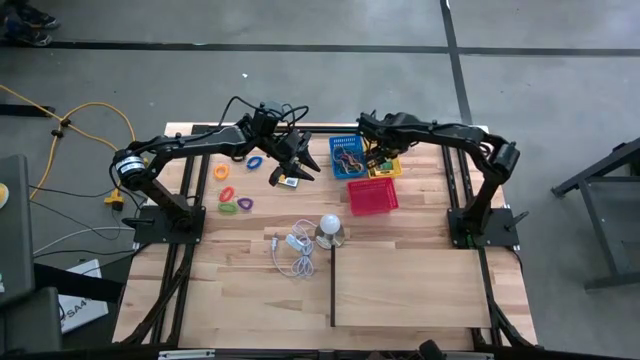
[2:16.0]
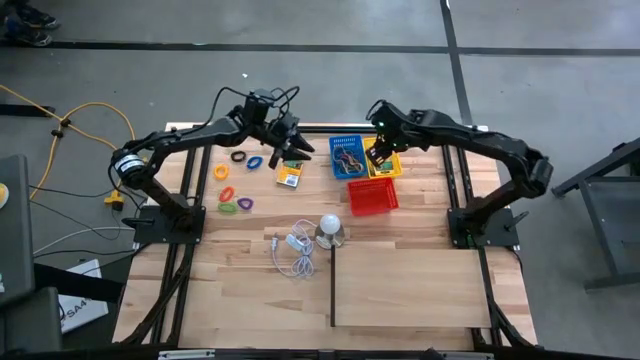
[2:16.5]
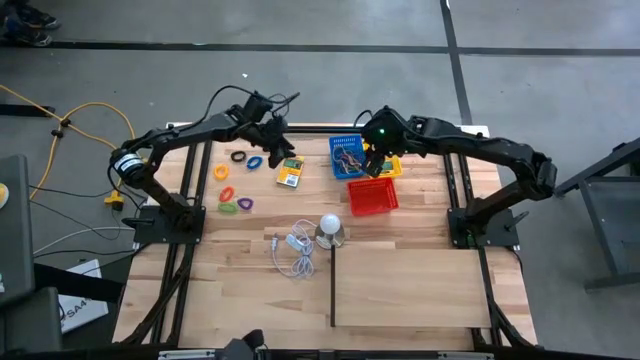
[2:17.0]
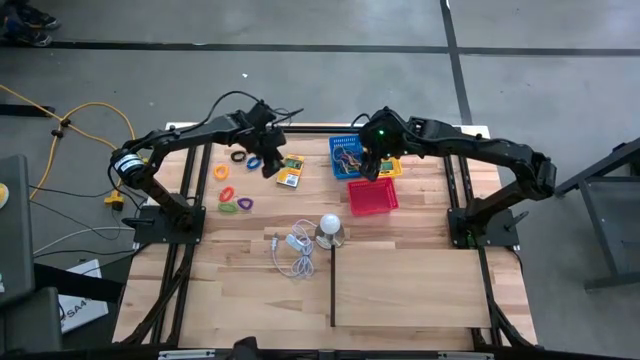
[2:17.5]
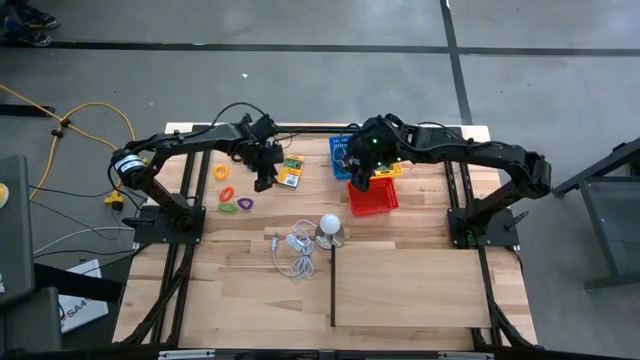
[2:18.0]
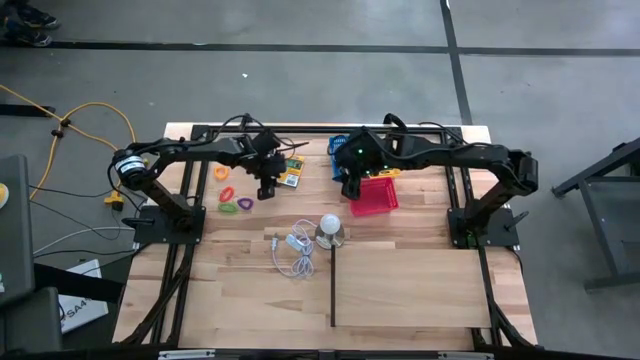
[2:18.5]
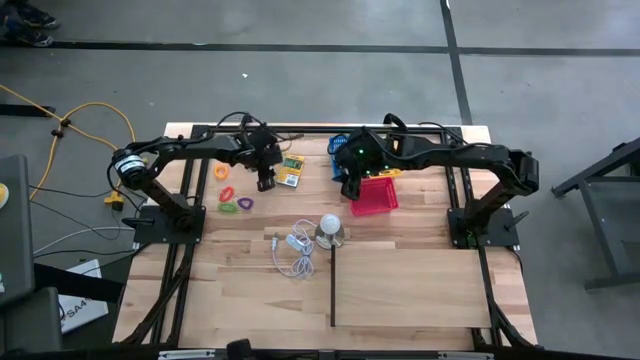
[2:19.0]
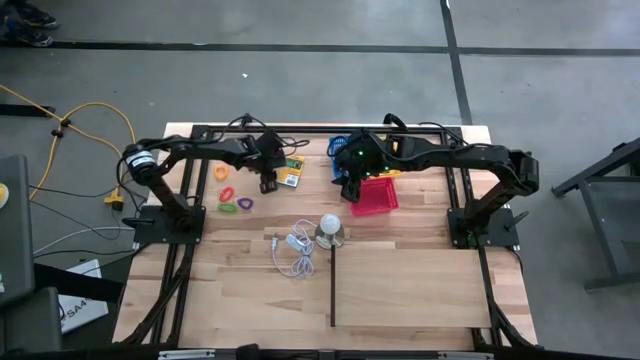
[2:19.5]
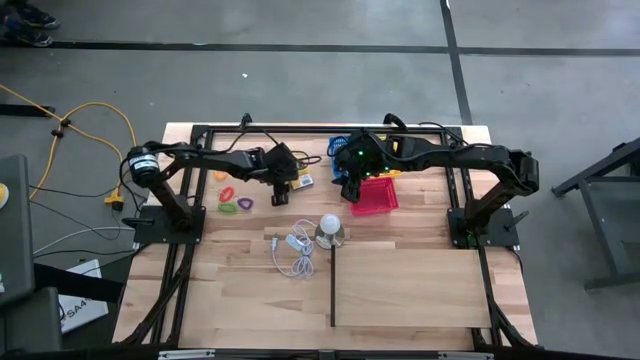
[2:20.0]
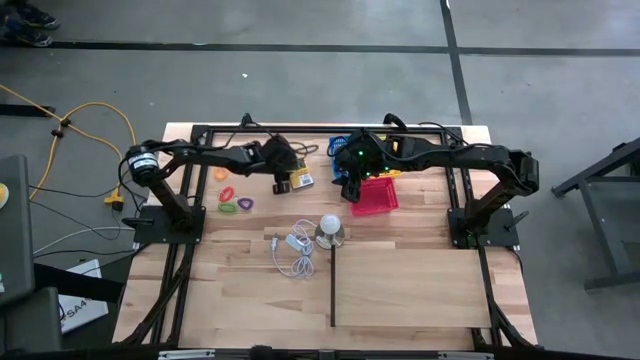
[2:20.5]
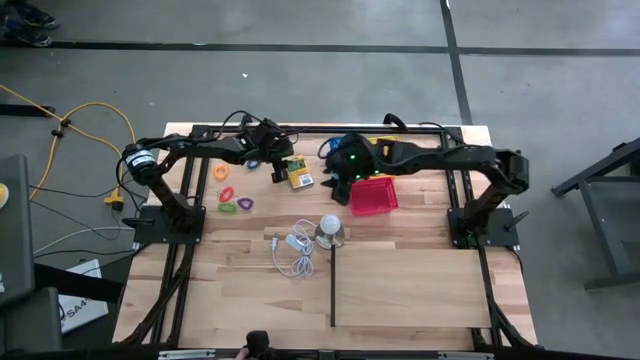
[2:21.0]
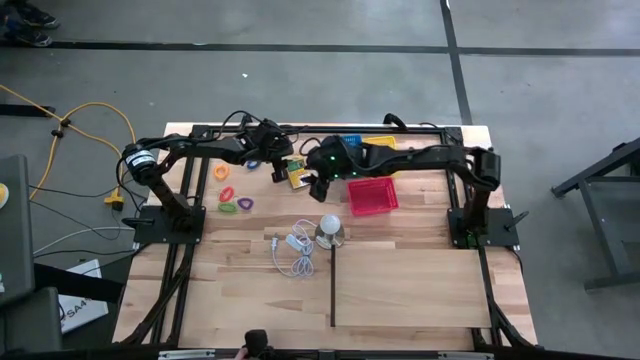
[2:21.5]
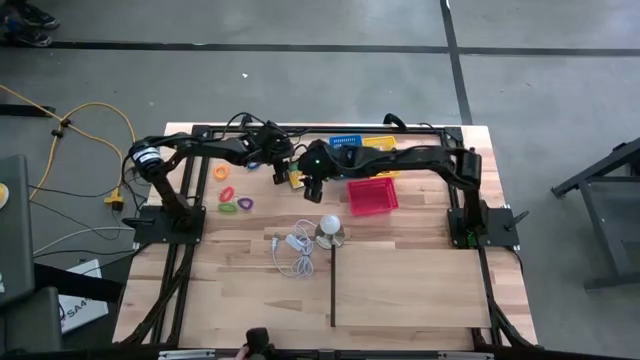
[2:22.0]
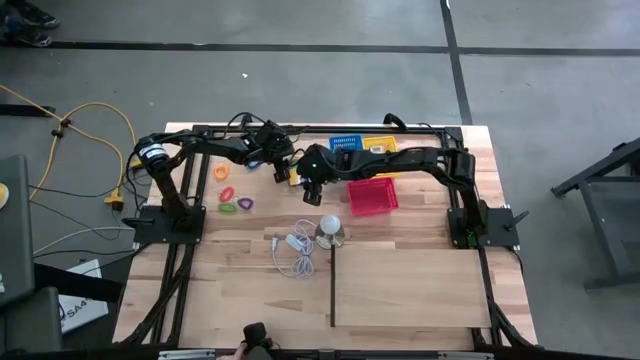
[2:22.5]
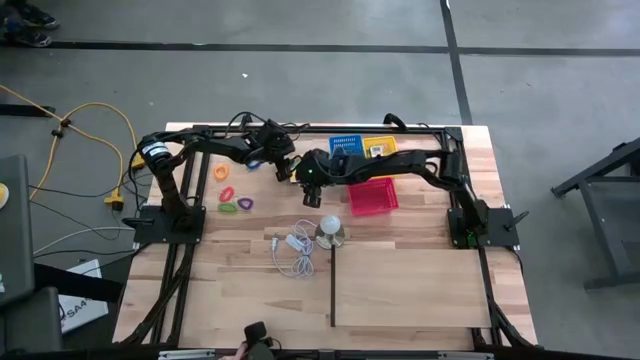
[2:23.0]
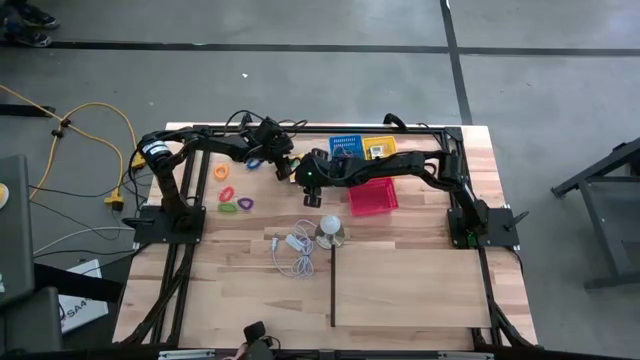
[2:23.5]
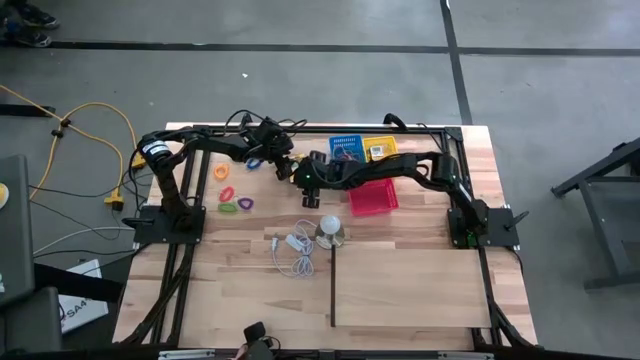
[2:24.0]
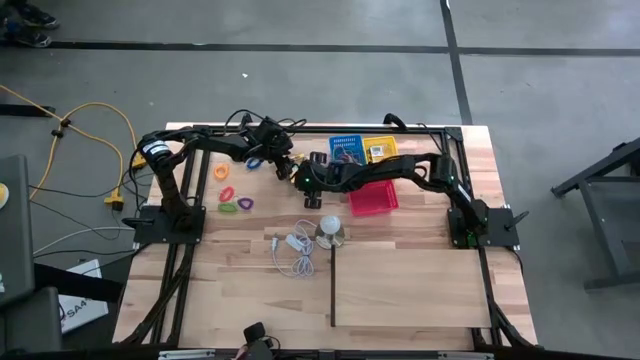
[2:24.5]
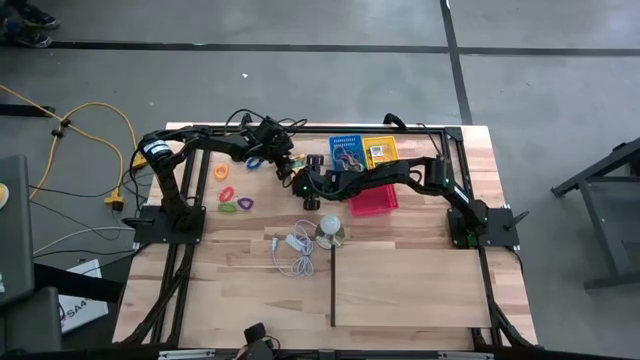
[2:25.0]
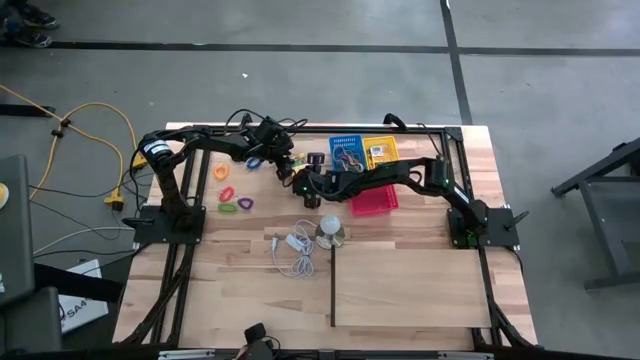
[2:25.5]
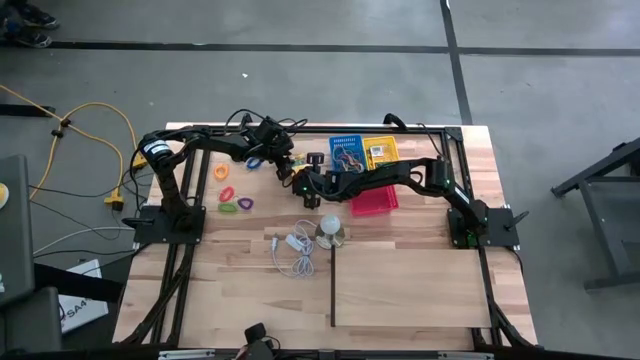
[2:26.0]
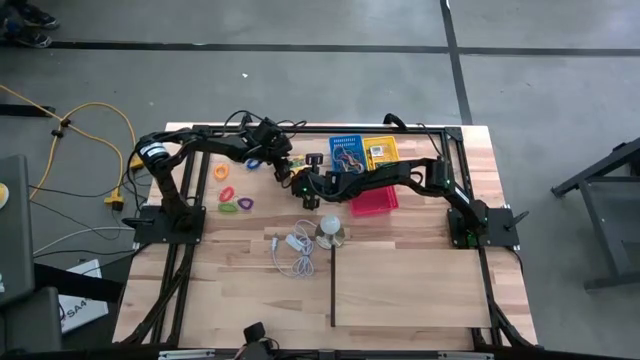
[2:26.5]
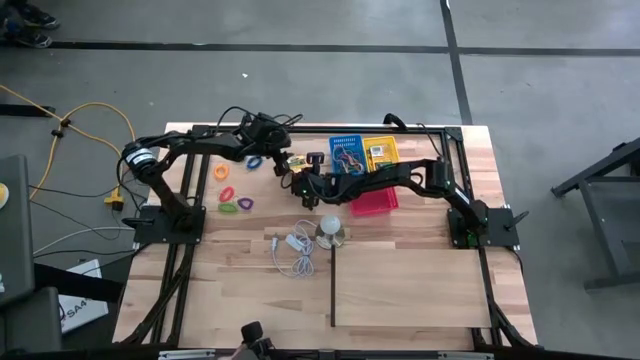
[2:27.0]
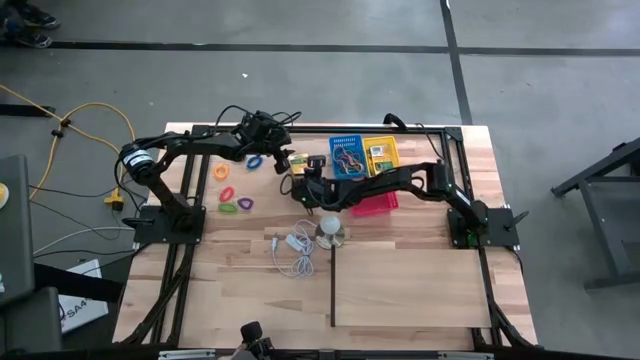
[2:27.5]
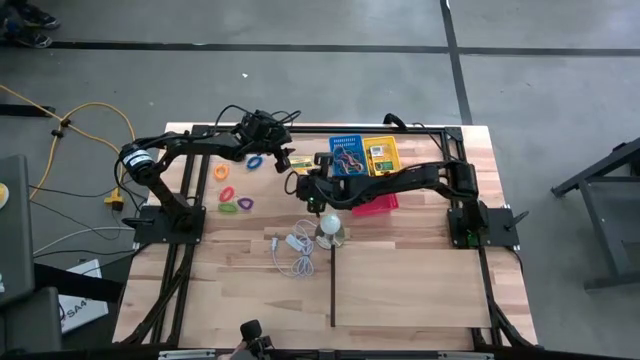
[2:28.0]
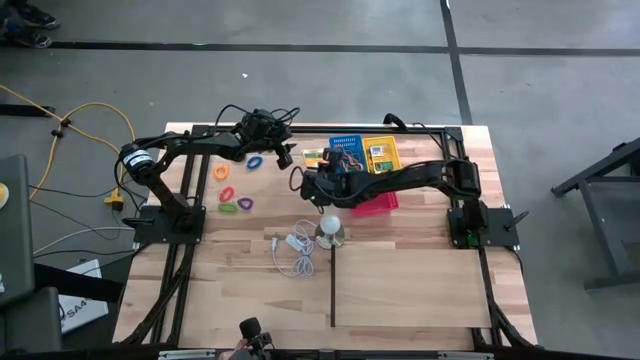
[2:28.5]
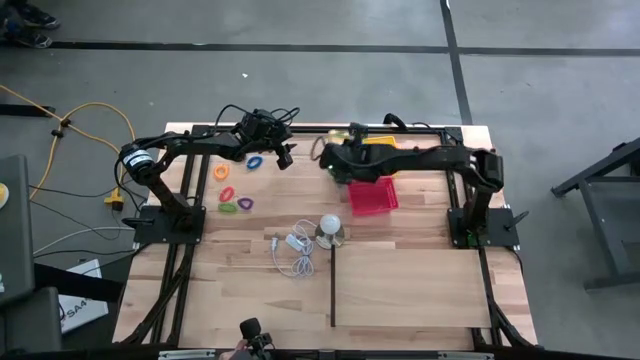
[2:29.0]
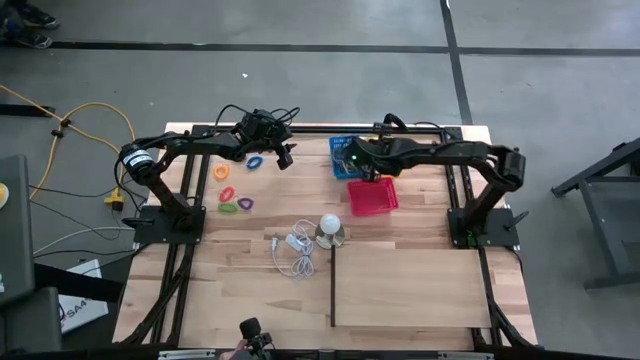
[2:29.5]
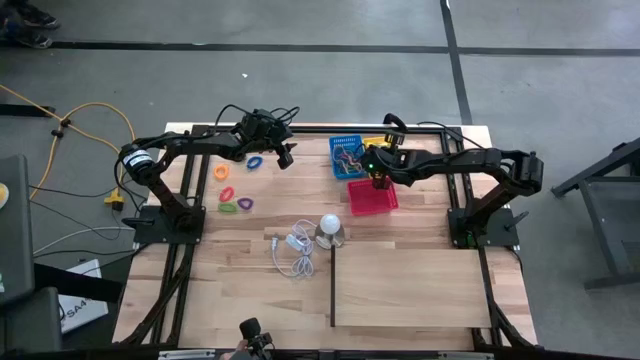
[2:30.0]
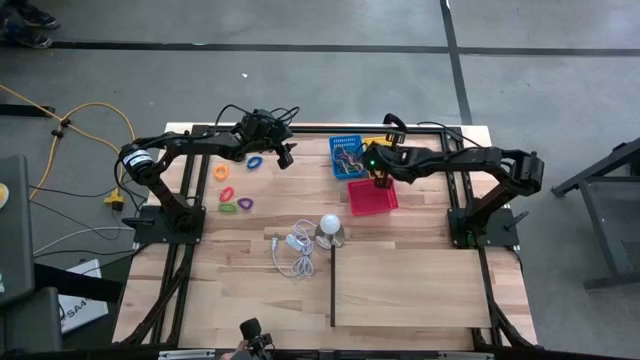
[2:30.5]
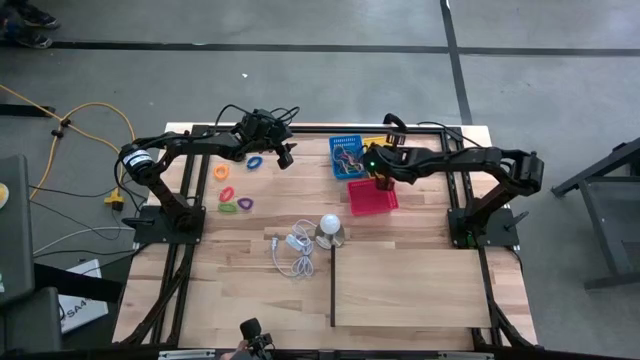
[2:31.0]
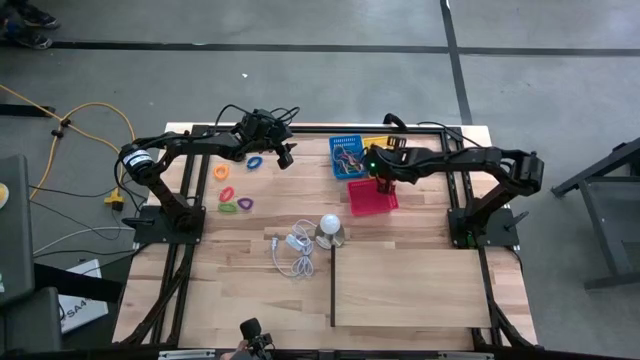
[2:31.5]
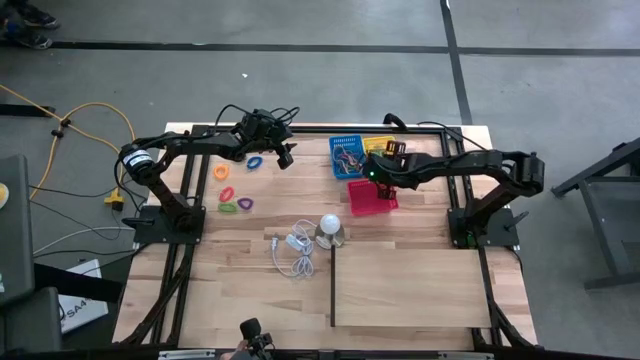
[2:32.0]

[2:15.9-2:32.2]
Task: Pick & Place Office Desk Supplies
Stack the yellow crayon box on top of the yellow crayon box

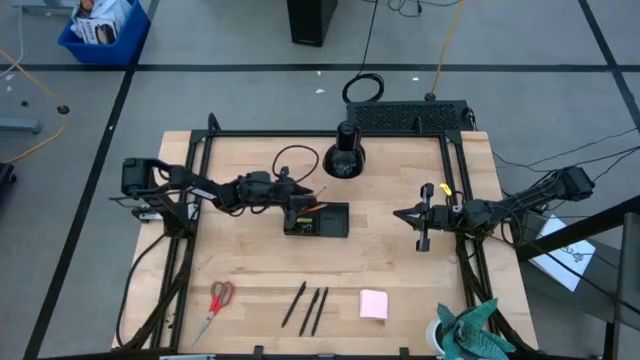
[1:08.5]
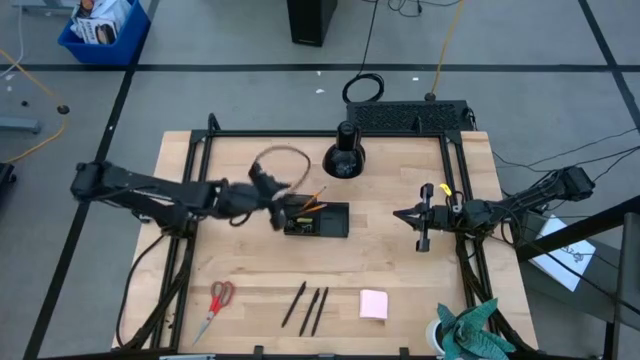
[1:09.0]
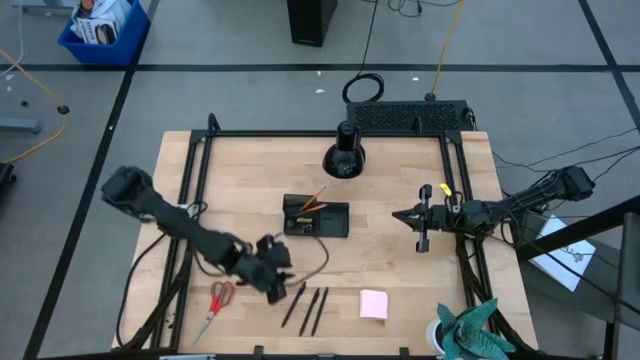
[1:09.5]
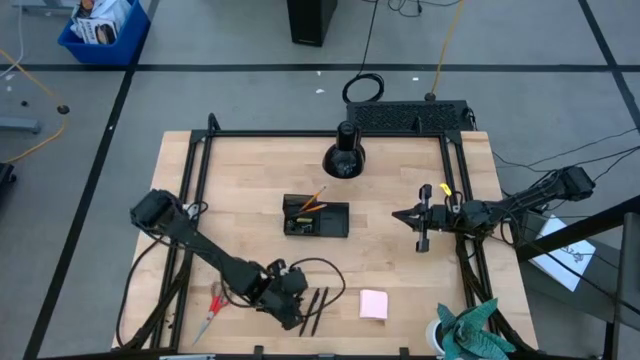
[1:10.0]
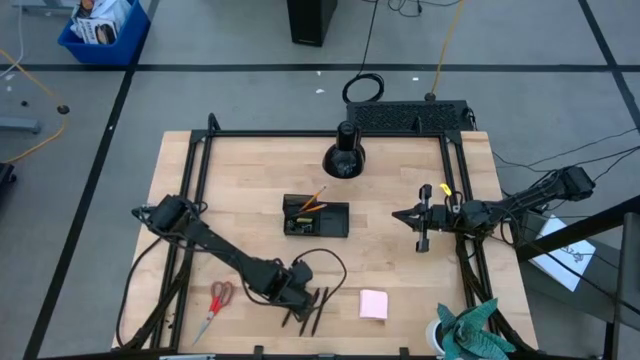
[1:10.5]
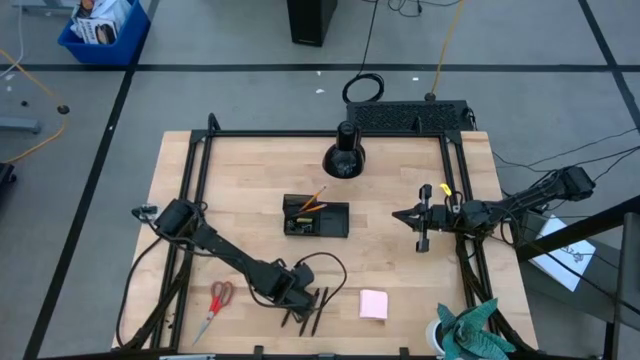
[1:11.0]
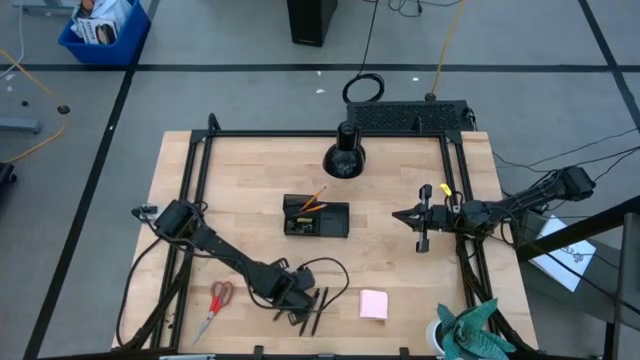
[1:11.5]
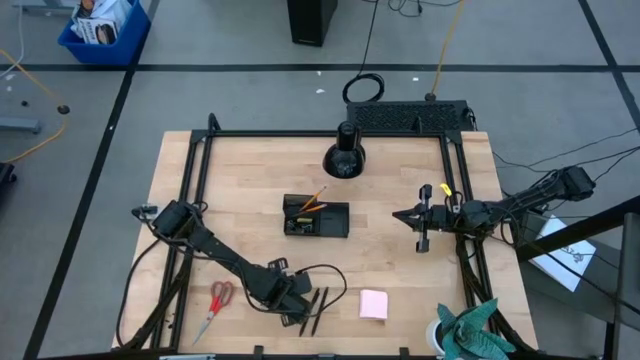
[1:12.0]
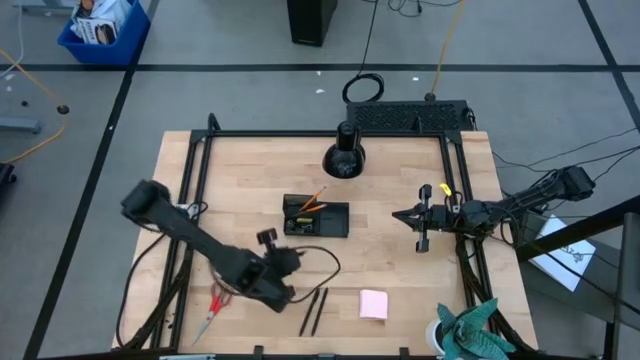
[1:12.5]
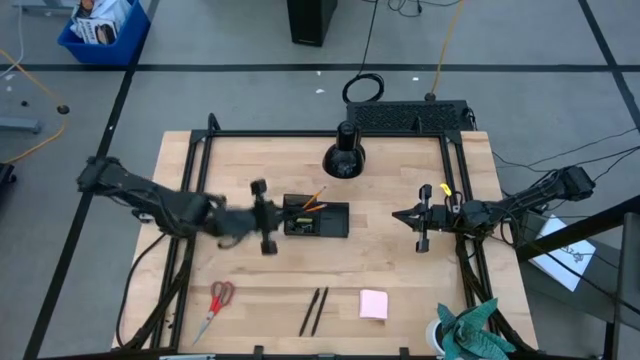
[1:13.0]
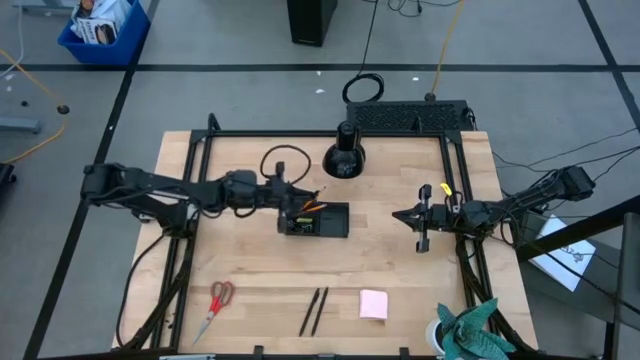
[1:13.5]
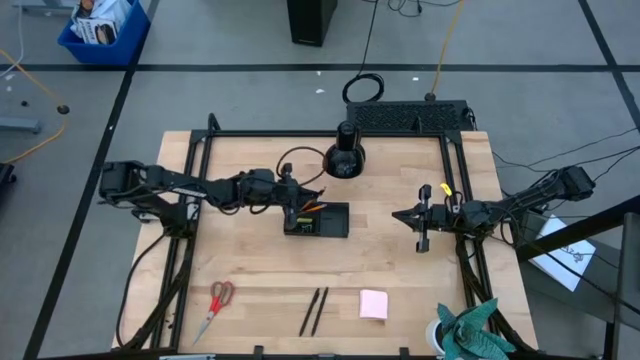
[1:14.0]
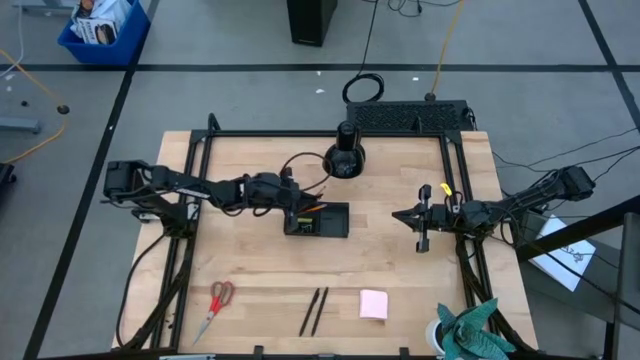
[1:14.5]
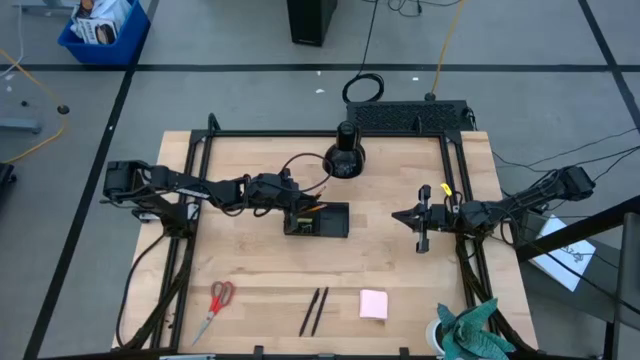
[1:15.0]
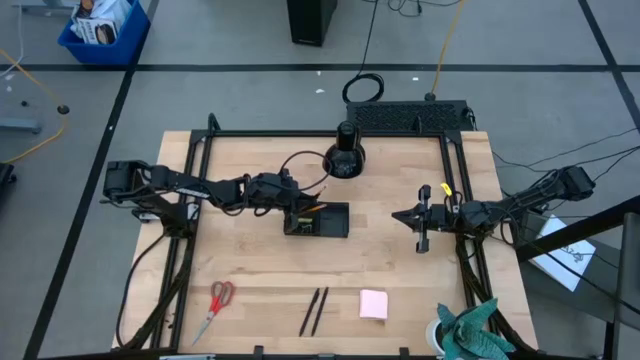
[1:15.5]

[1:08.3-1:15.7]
Task: Pick and place office supplies into organizer
Put the left pen into the desk organizer
